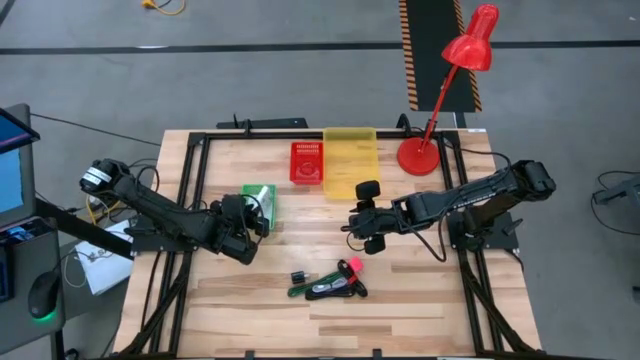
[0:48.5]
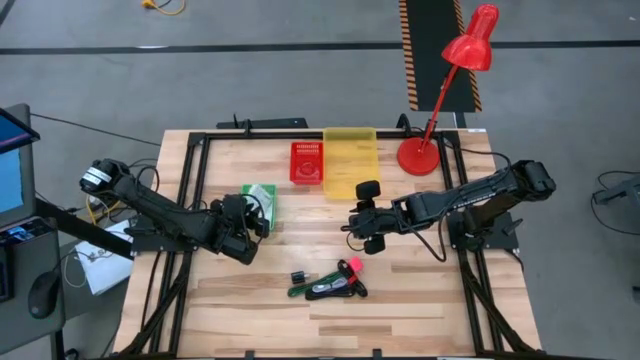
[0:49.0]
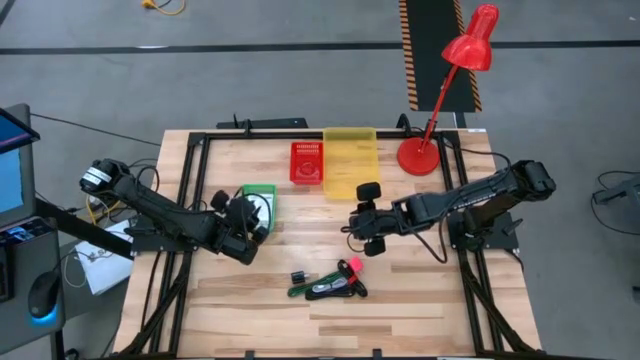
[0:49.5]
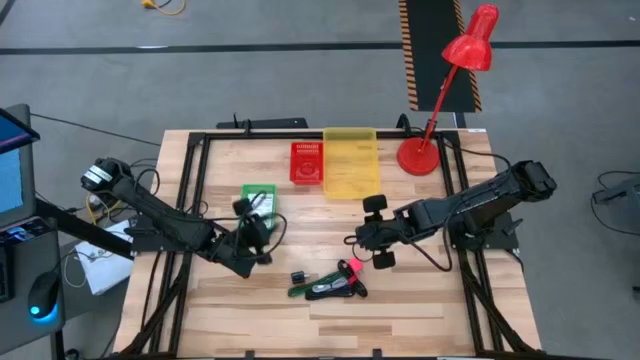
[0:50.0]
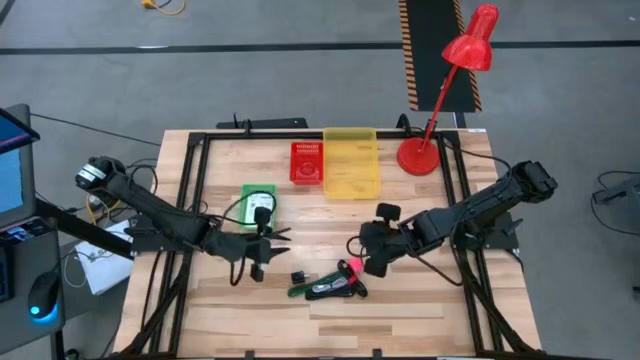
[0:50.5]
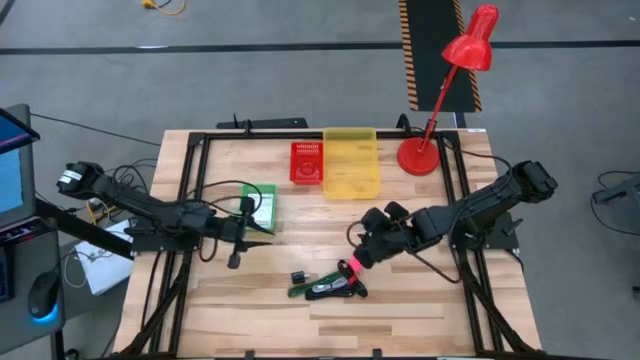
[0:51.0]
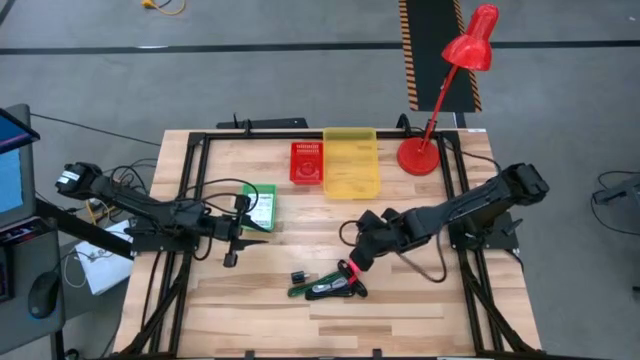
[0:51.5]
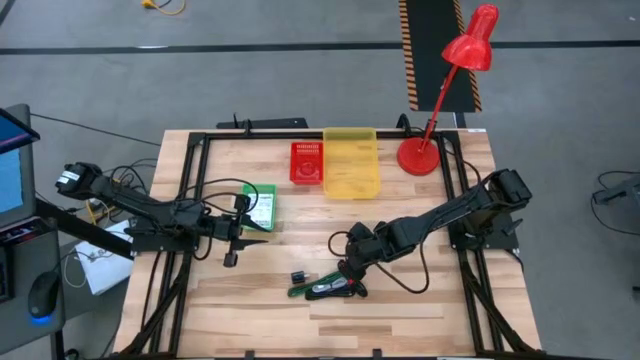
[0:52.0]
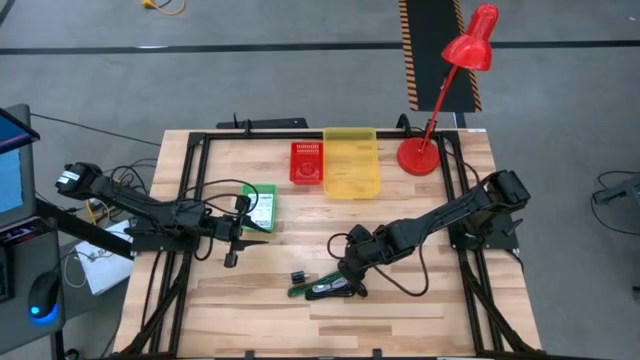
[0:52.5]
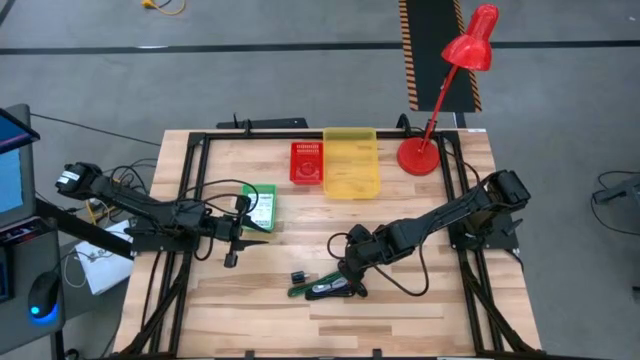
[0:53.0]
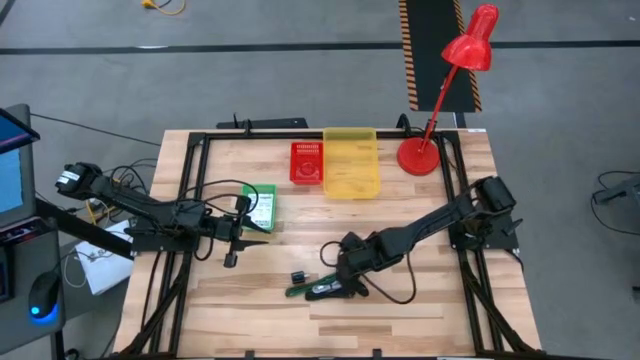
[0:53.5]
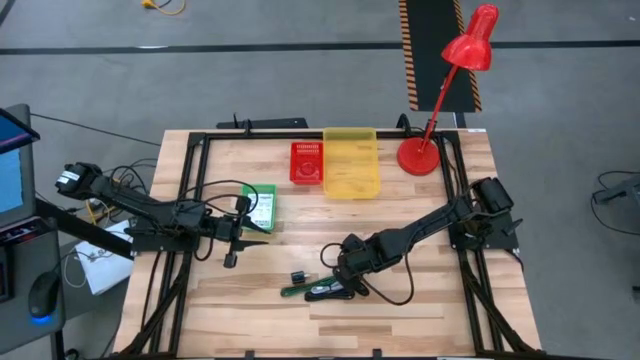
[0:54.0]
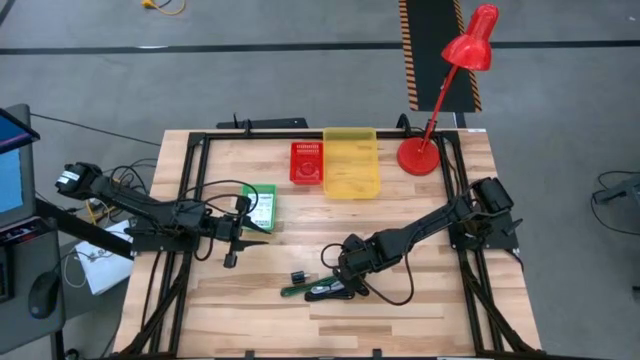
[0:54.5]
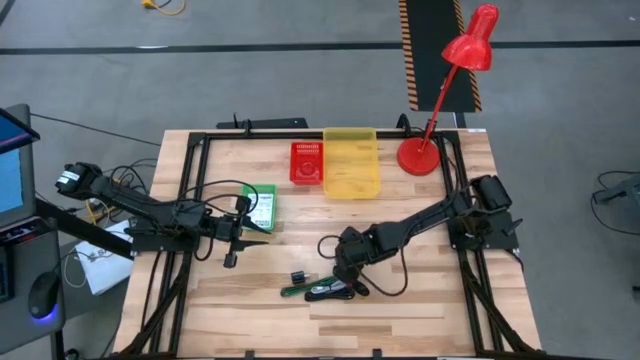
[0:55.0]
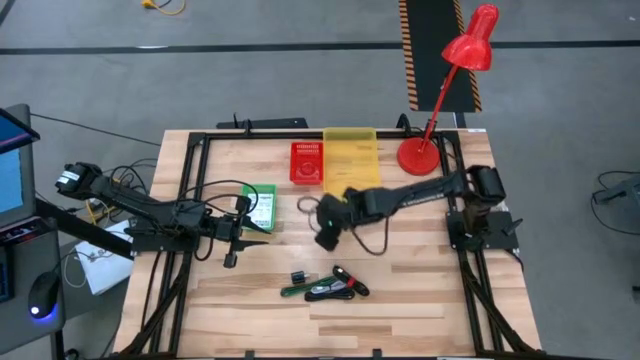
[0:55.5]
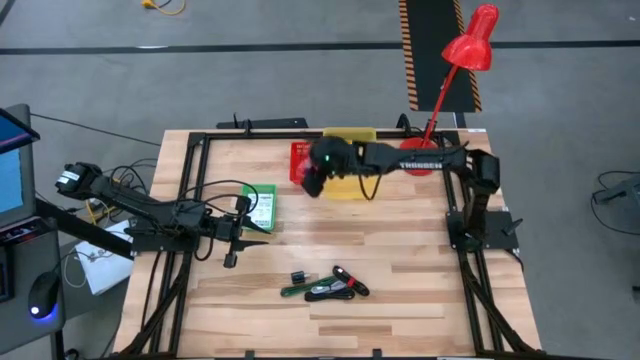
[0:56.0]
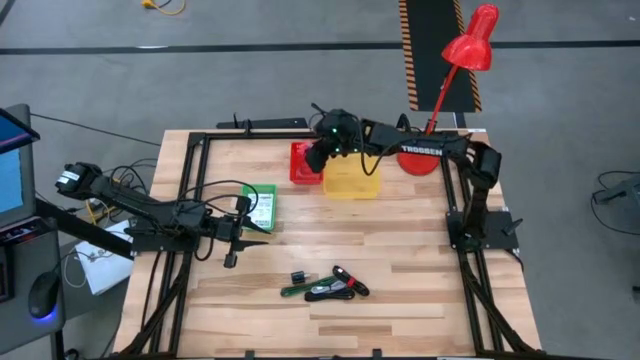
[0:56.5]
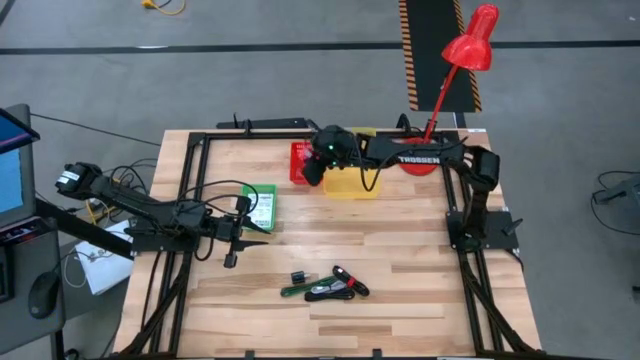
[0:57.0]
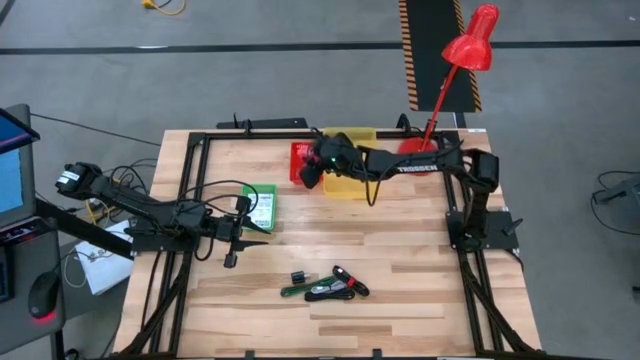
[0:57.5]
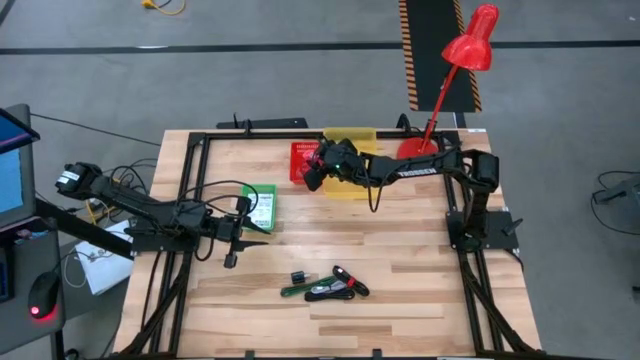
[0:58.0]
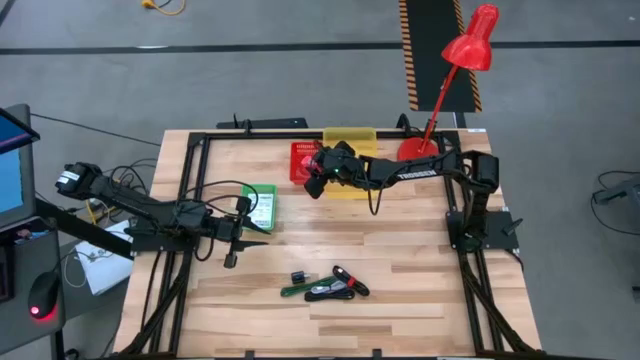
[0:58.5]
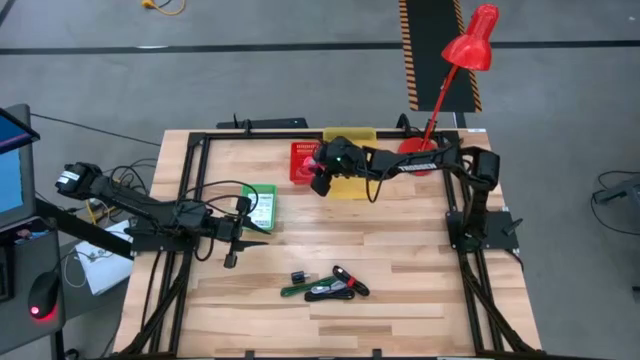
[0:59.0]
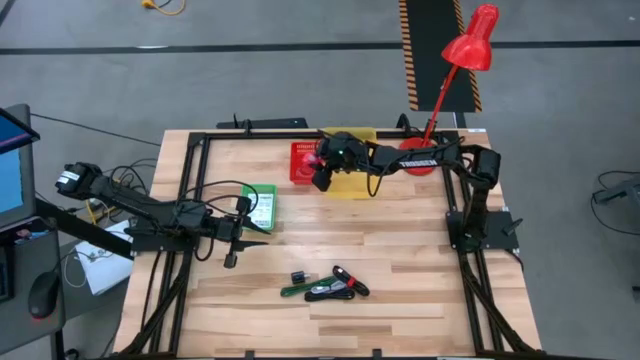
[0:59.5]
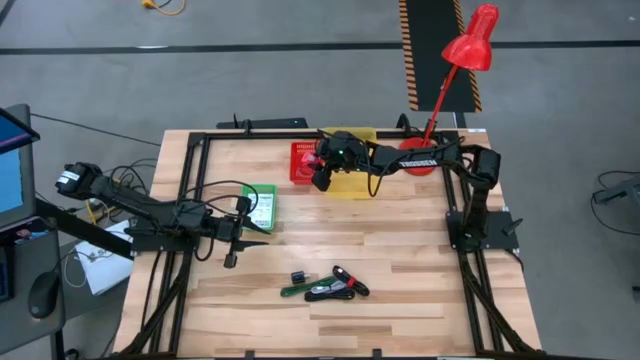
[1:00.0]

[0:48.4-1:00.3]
Task: Pick and place items into bin
Put the pink charger adapter into the red basket

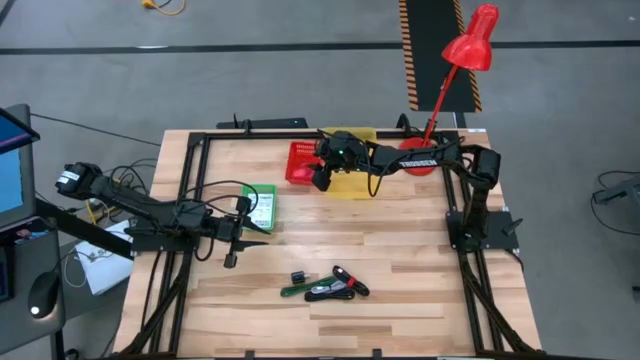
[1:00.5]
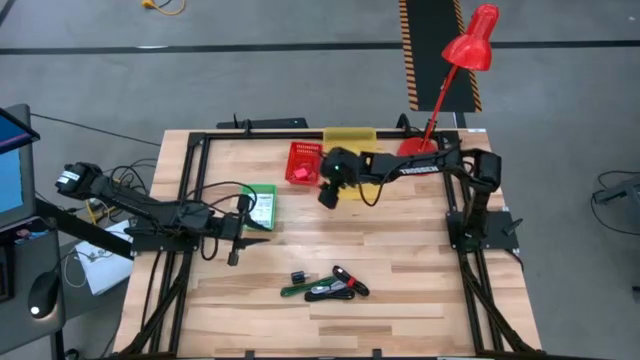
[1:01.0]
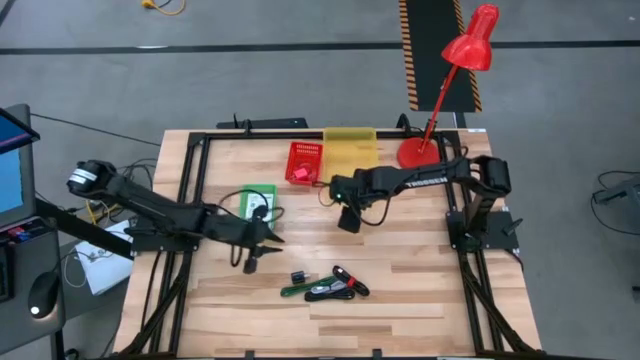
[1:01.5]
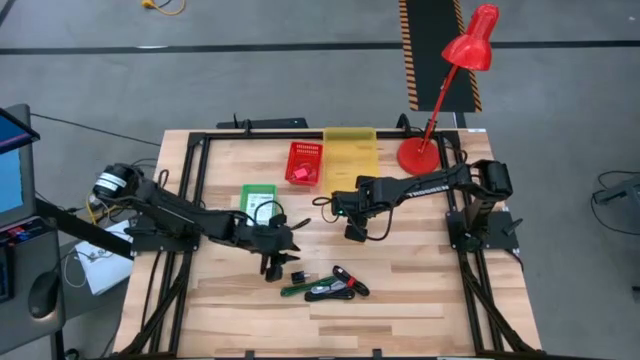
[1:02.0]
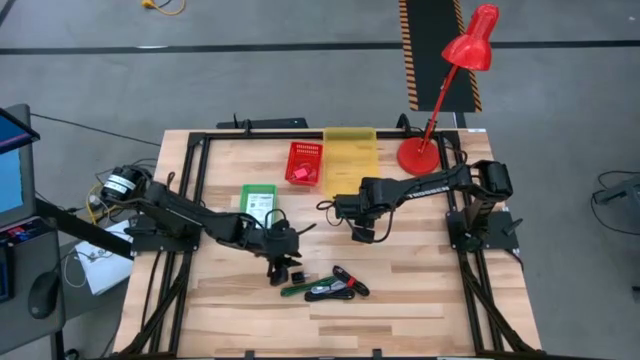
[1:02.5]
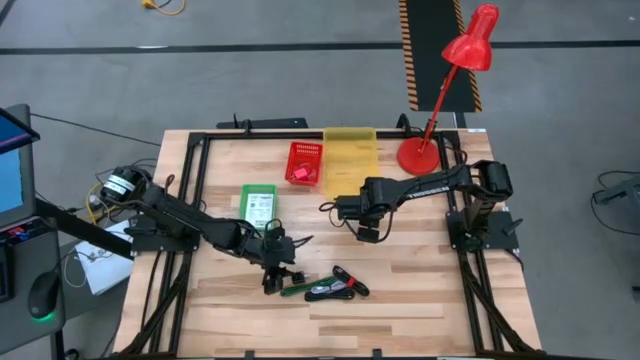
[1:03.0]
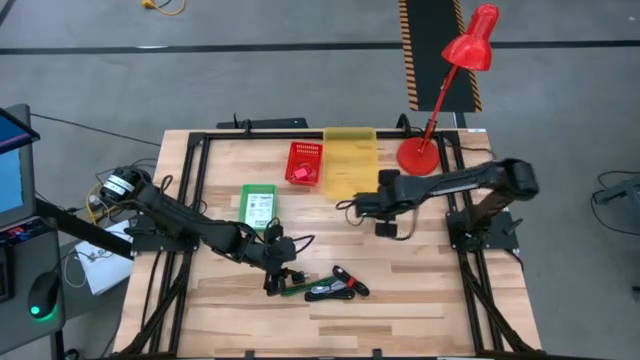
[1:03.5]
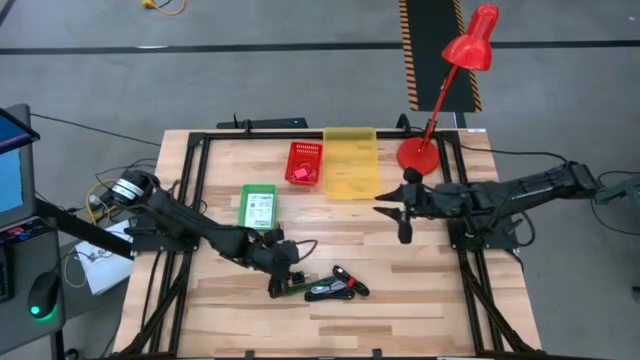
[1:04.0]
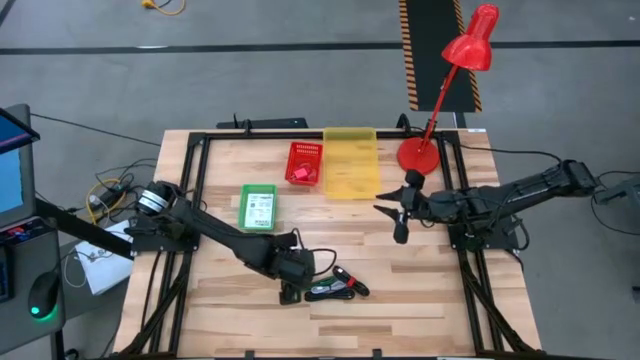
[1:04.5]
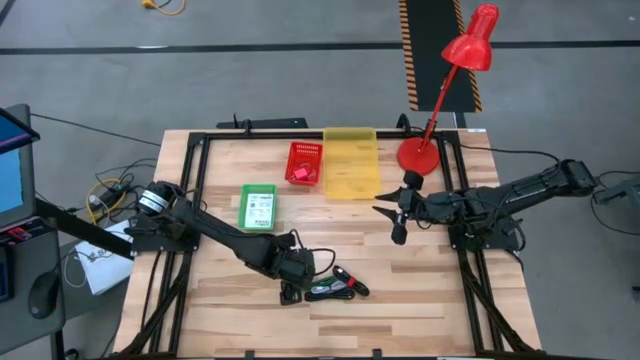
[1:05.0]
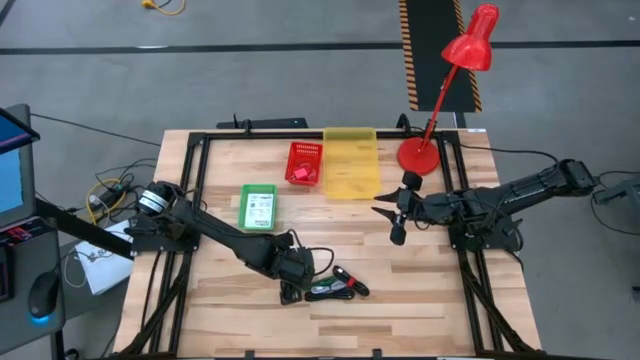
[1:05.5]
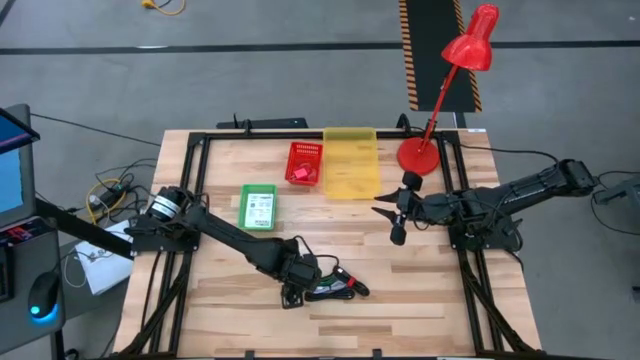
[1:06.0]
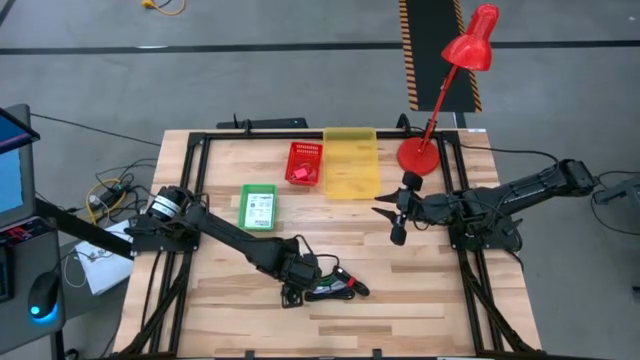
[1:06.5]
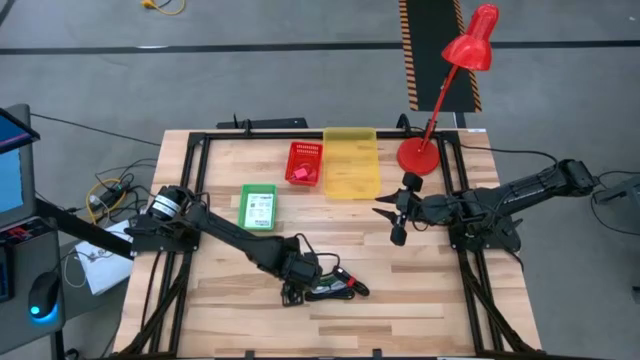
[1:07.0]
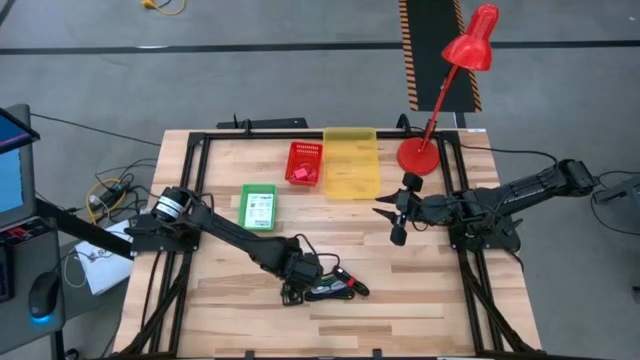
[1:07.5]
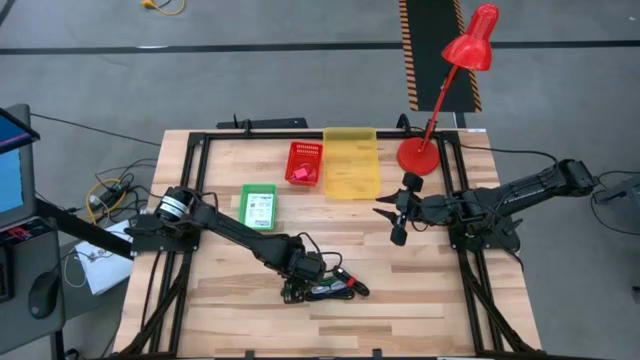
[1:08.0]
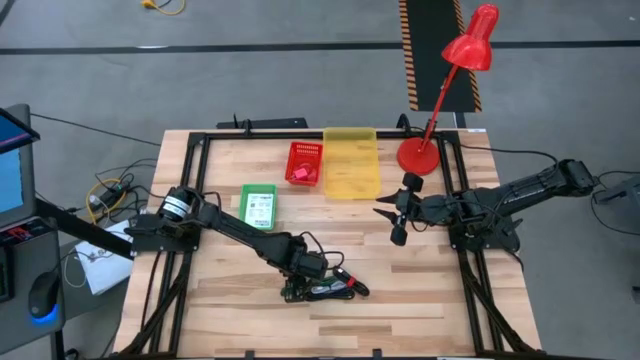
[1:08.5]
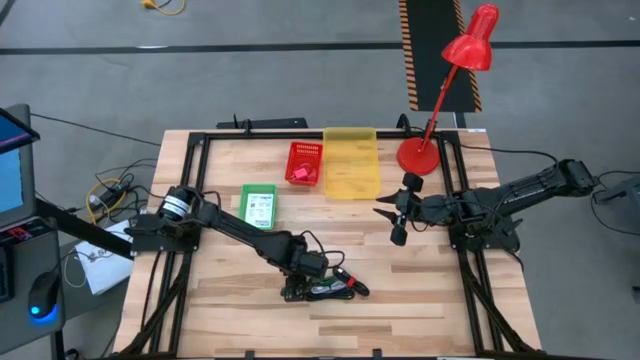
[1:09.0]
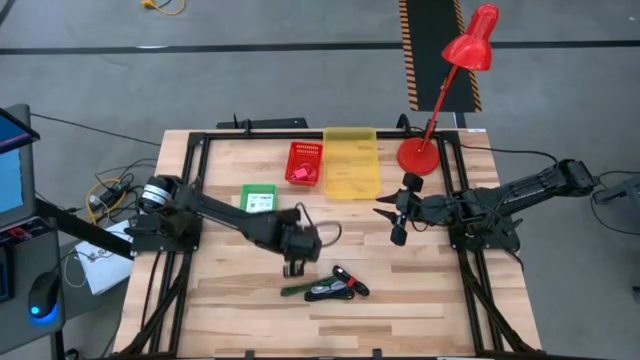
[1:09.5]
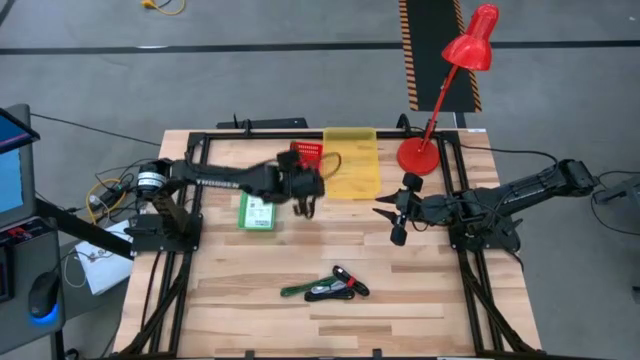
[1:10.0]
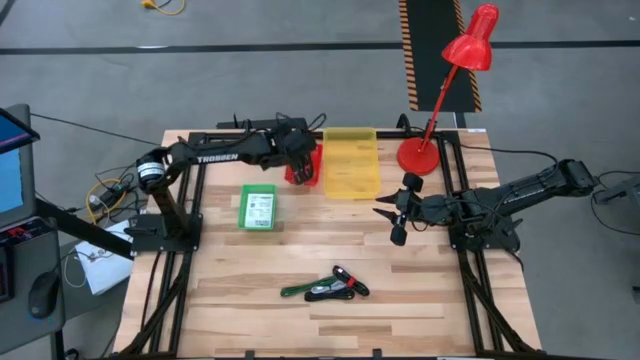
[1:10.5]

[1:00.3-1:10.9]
Put the black charger adapter into the red basket
